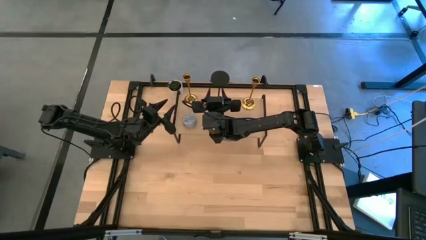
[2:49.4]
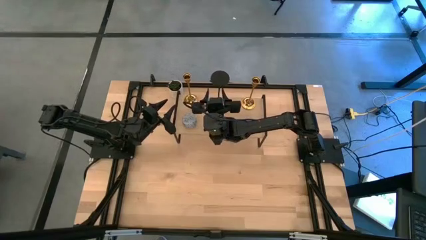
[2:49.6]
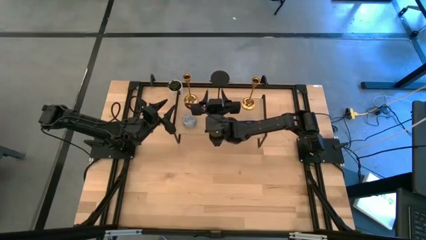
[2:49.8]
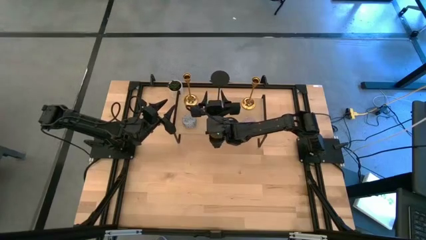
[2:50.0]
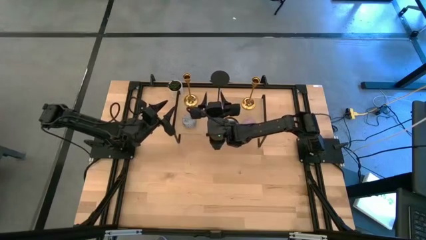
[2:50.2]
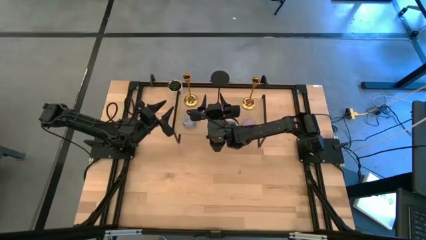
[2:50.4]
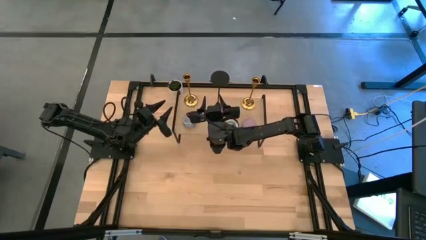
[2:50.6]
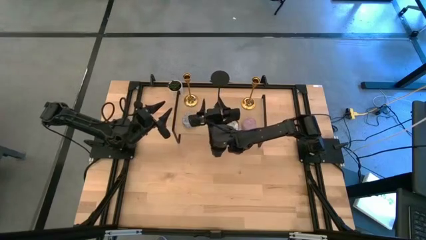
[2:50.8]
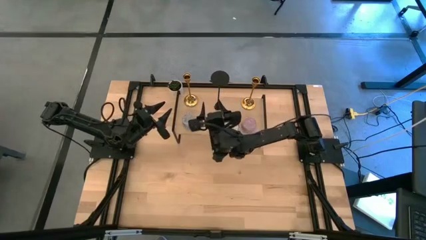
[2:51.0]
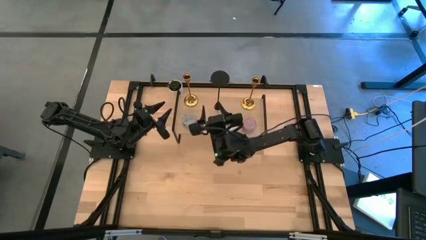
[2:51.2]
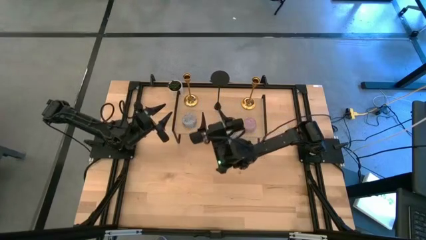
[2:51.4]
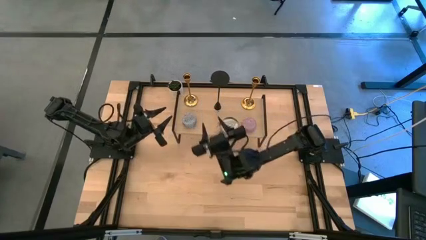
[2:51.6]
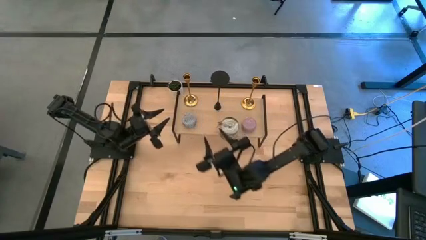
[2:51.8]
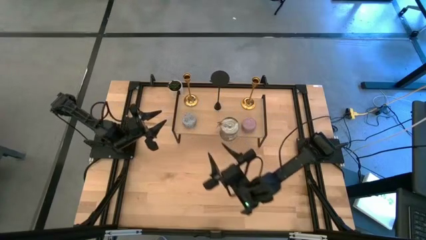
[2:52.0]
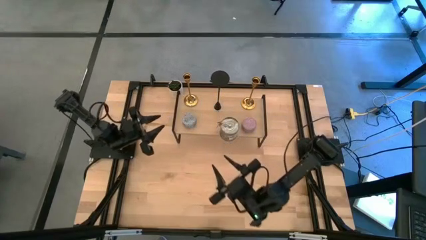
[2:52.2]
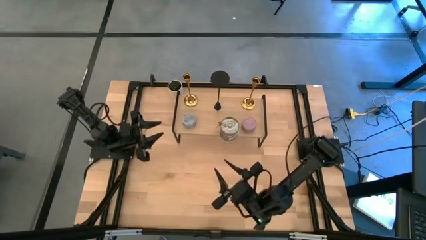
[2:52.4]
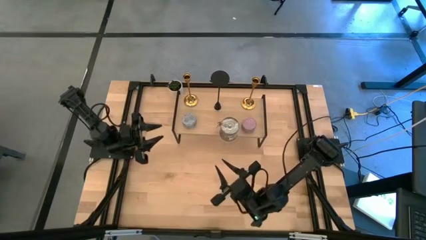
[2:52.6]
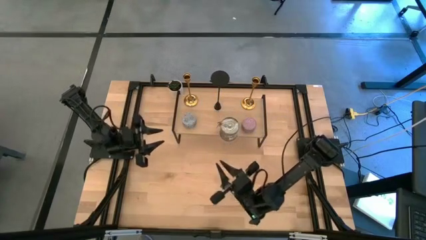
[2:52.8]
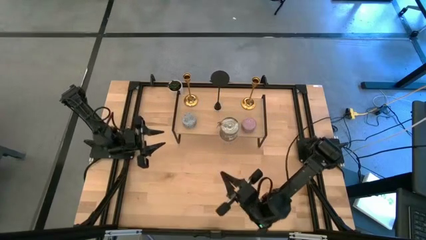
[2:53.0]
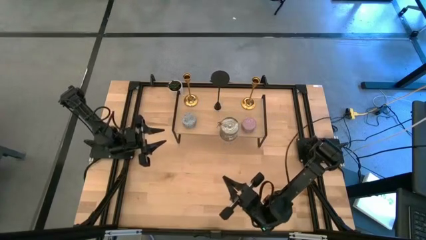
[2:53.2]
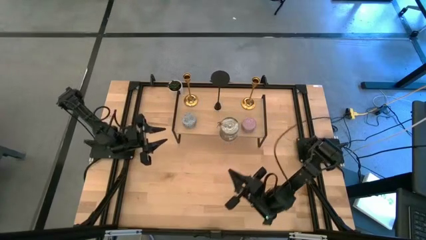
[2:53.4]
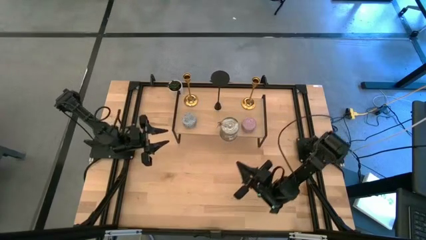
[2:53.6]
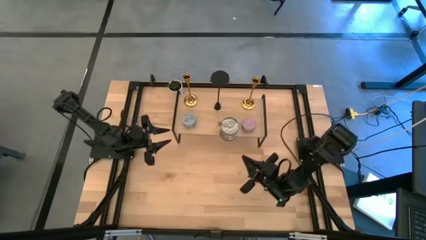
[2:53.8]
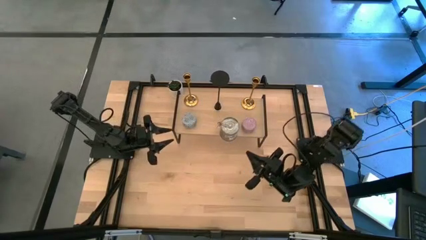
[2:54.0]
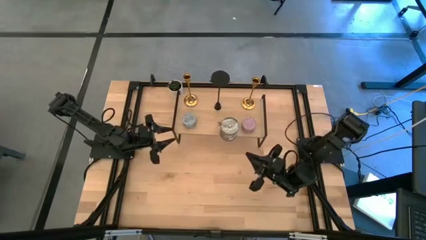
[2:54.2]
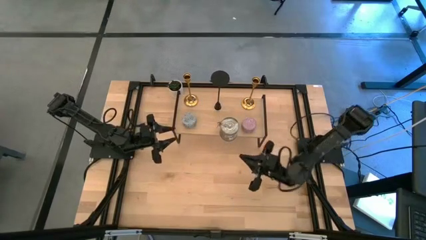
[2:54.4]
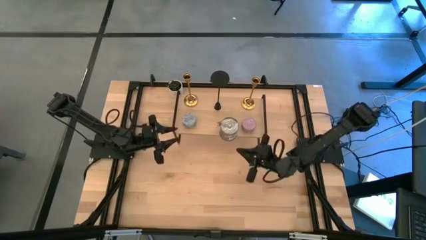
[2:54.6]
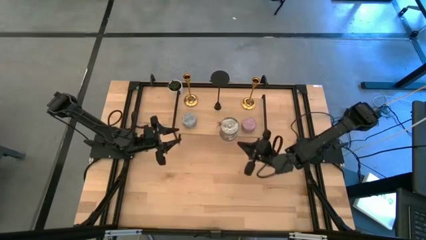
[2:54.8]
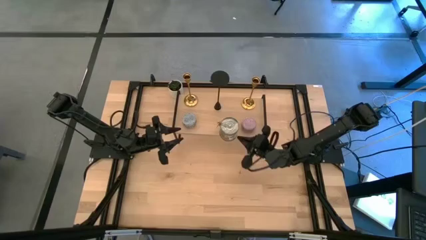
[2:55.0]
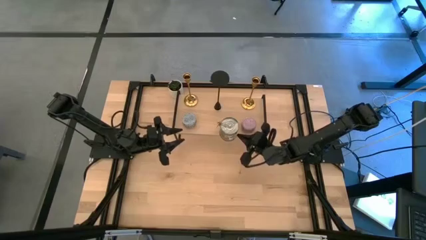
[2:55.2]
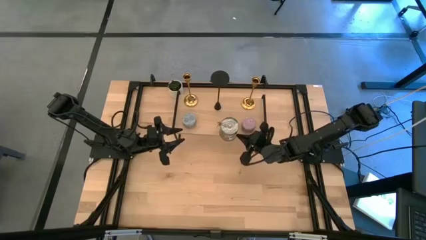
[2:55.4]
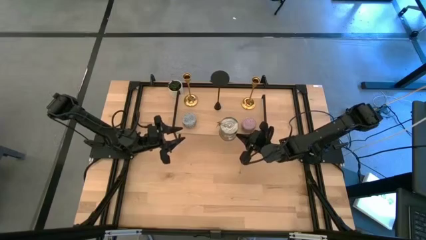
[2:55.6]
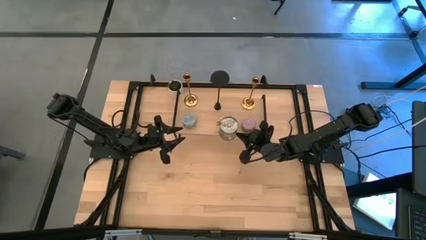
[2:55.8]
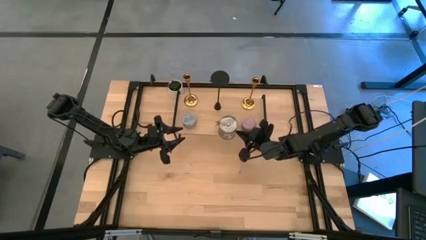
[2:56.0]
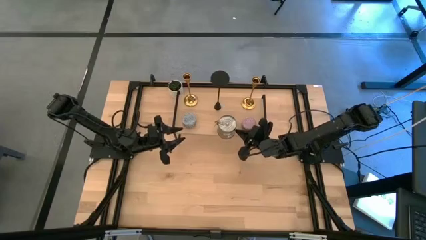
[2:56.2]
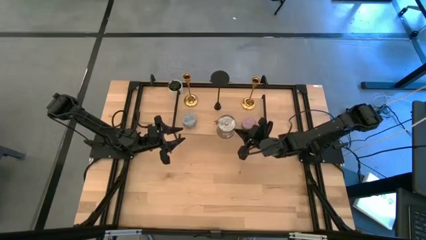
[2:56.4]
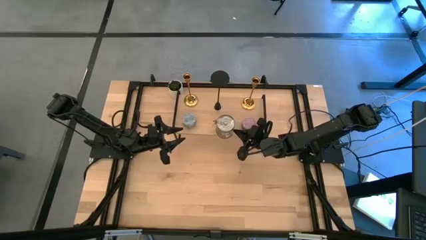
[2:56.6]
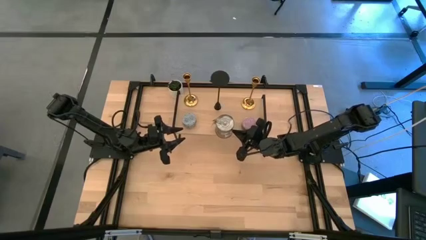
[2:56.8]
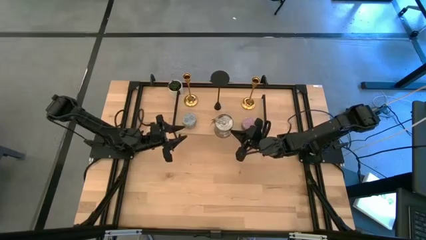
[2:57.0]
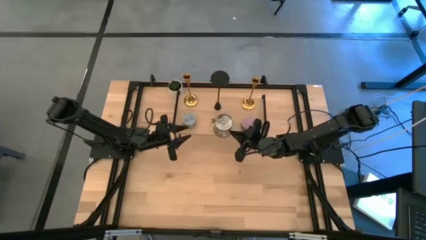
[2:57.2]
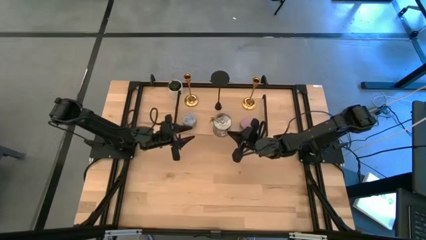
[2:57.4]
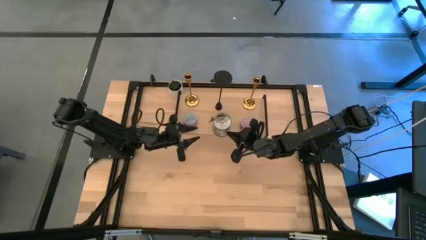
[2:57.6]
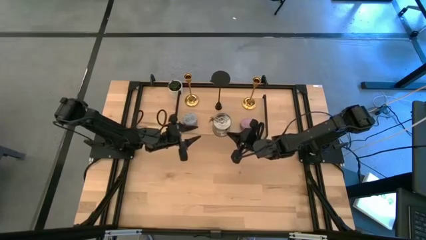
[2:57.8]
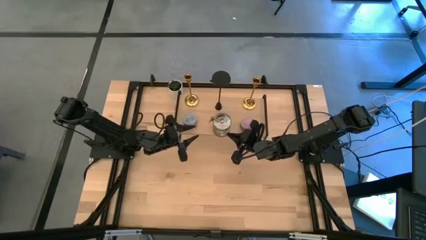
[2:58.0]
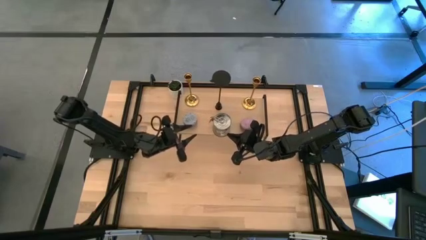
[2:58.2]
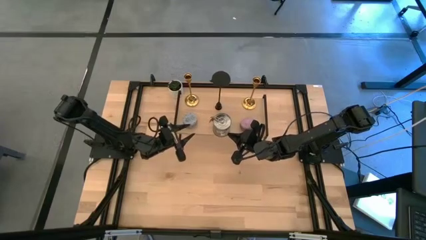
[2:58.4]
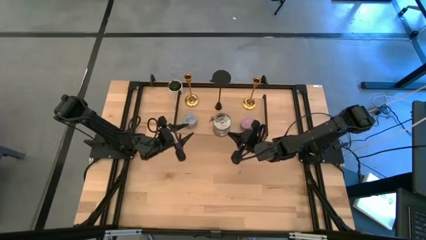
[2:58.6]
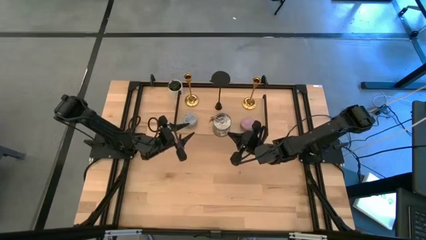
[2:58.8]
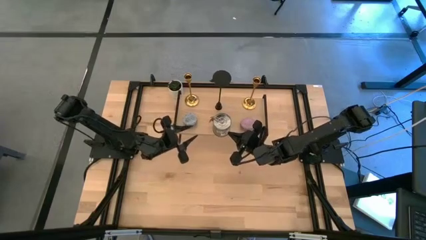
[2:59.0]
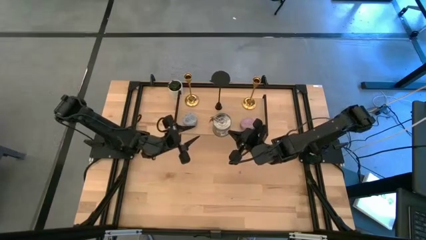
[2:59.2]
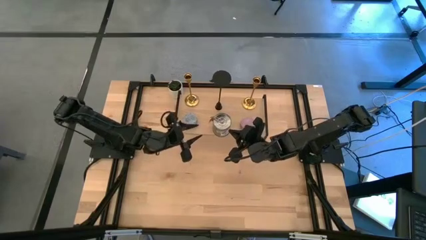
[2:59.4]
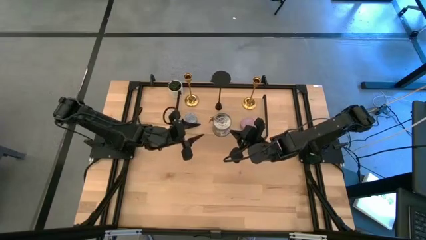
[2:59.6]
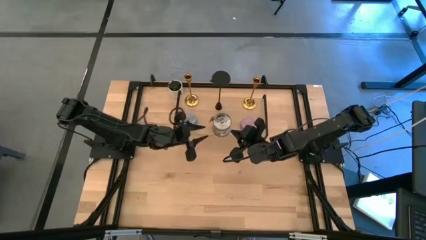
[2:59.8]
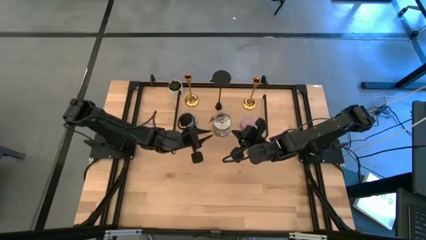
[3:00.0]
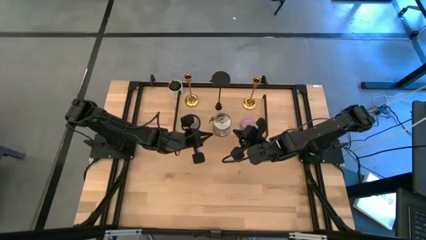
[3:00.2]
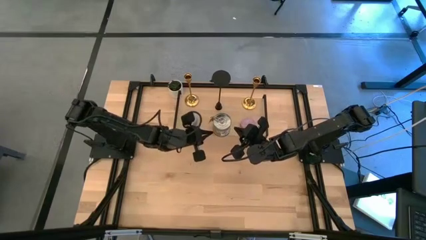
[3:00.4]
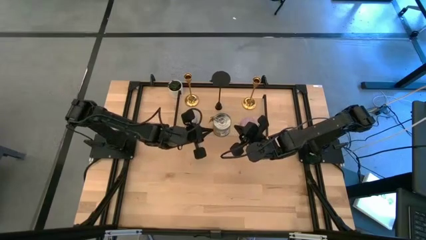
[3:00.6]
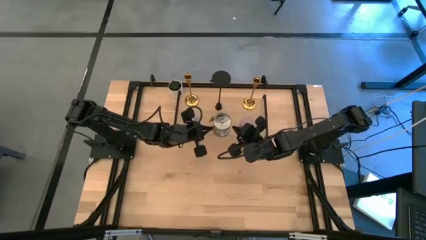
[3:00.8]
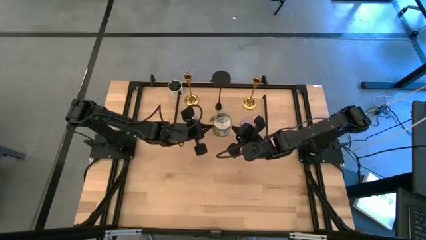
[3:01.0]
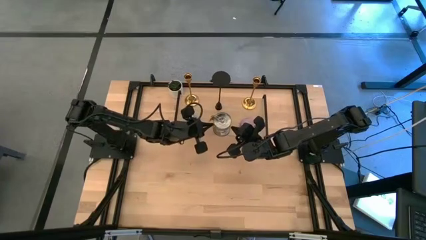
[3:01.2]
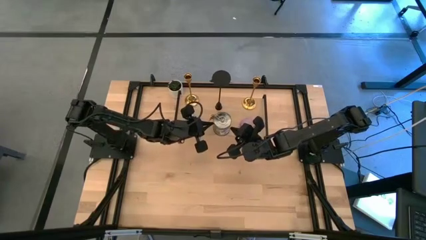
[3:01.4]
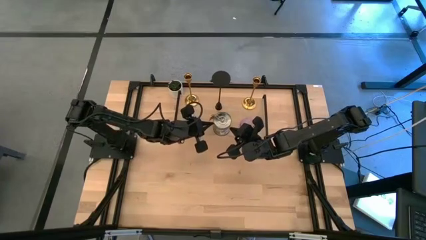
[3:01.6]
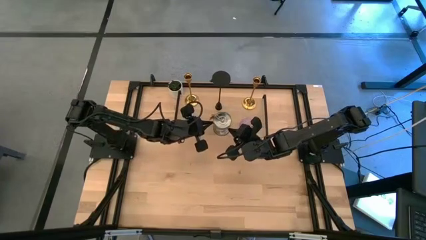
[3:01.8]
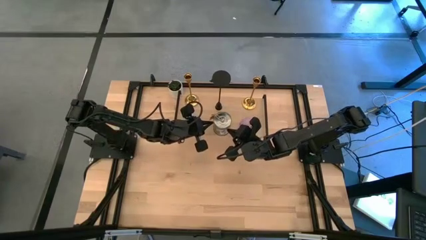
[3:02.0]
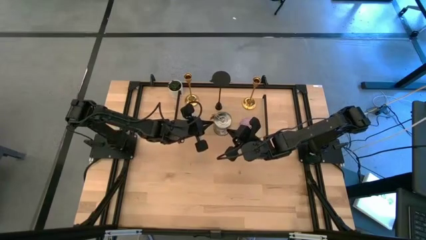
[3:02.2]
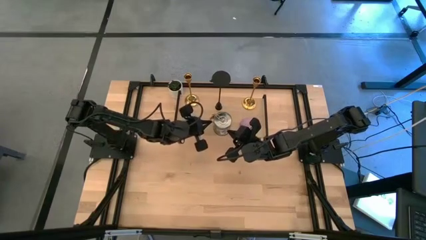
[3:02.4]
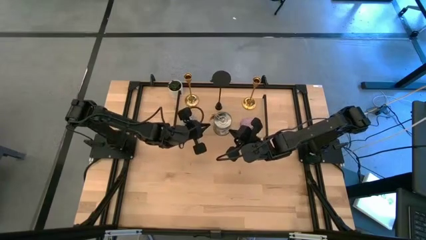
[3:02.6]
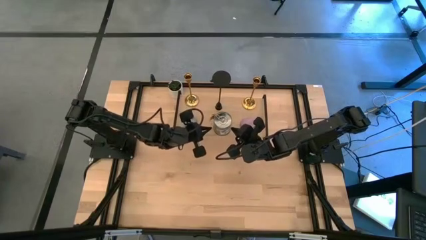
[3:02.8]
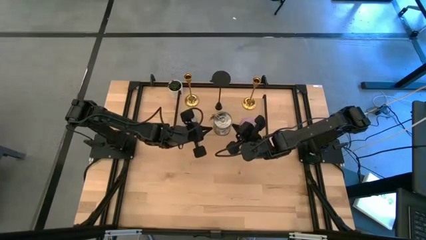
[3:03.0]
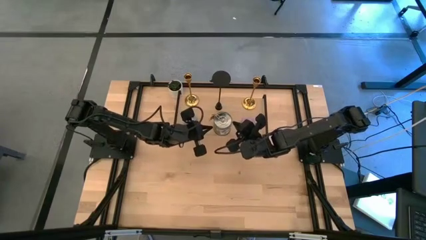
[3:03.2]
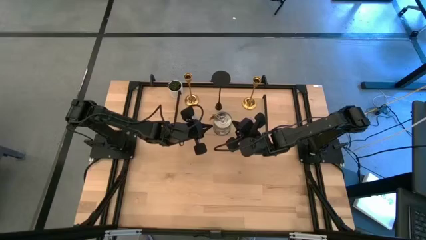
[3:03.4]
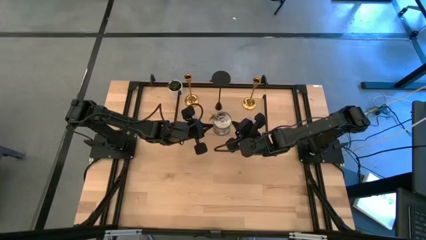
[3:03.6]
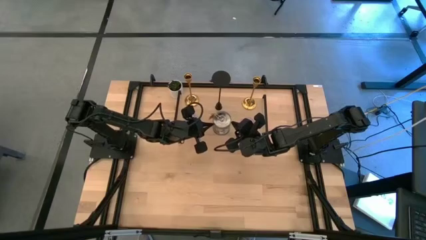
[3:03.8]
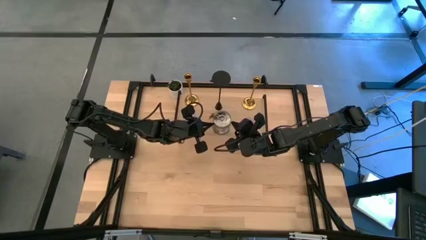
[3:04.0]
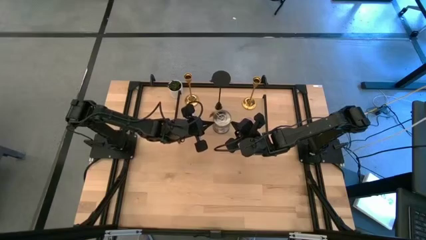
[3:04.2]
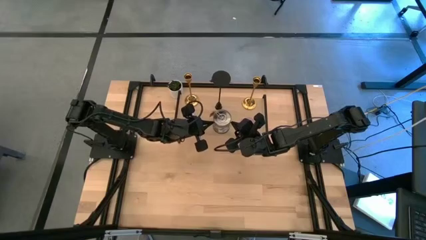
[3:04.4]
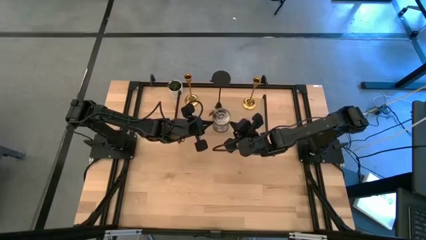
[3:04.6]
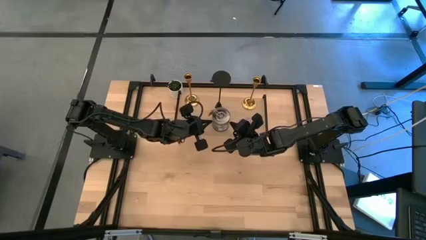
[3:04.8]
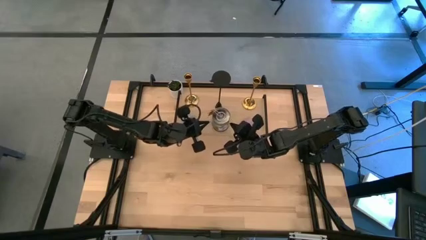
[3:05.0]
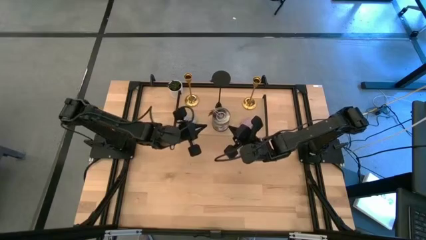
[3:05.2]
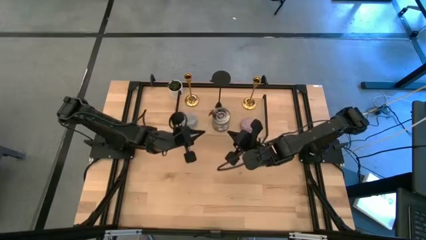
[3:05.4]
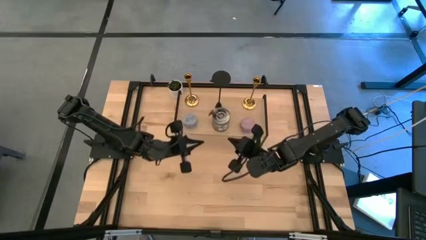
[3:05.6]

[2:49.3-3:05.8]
Task: Pick & Place candle stick holders
Return to Home Position
